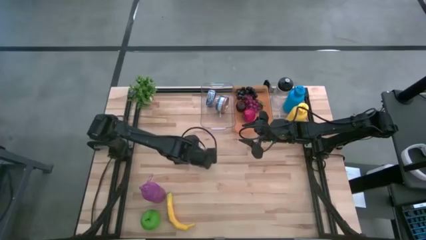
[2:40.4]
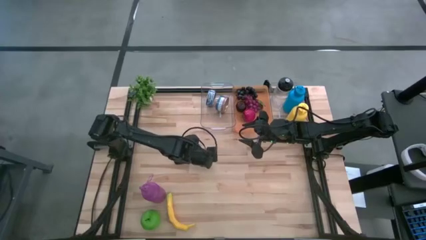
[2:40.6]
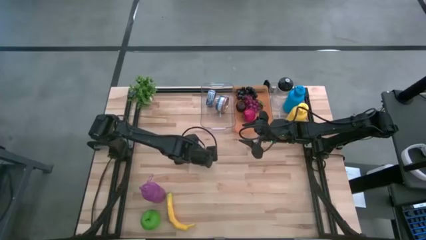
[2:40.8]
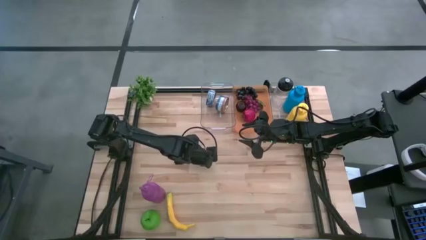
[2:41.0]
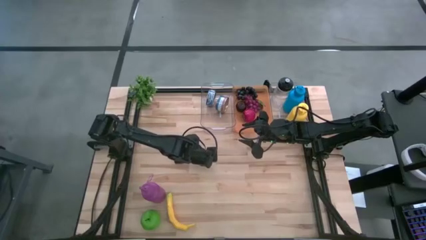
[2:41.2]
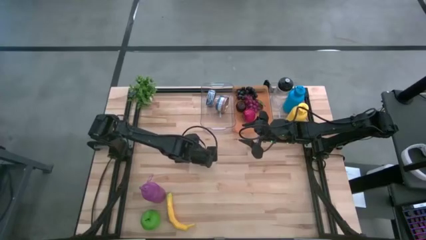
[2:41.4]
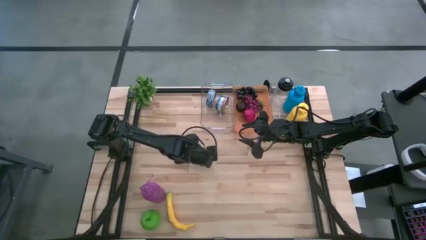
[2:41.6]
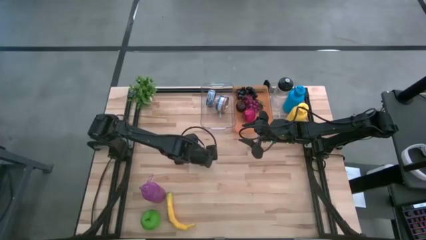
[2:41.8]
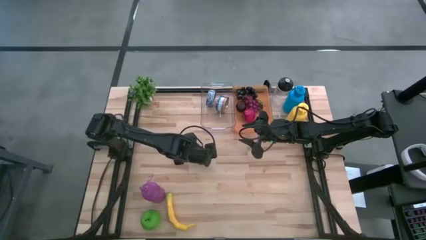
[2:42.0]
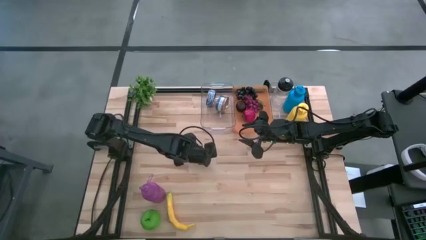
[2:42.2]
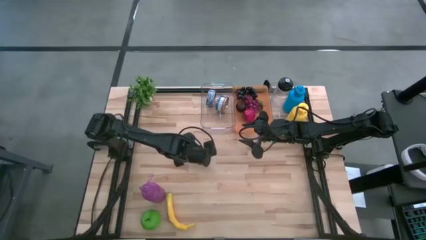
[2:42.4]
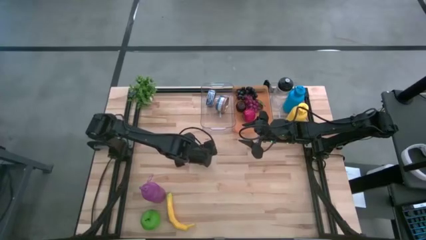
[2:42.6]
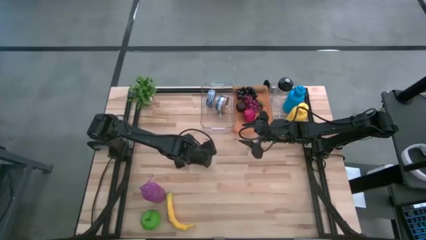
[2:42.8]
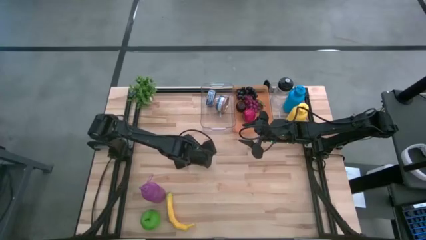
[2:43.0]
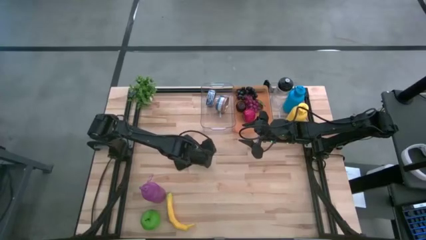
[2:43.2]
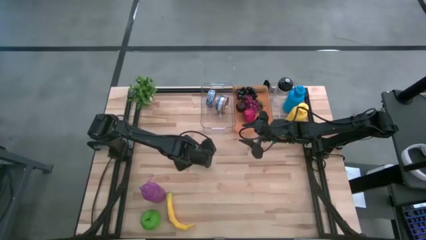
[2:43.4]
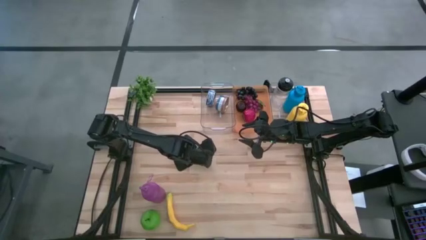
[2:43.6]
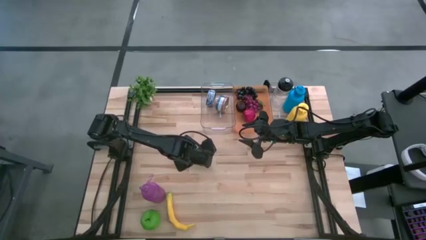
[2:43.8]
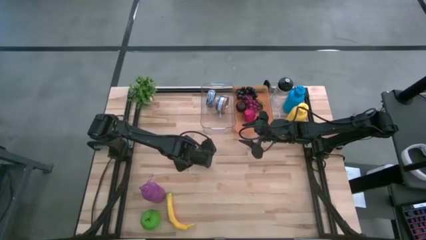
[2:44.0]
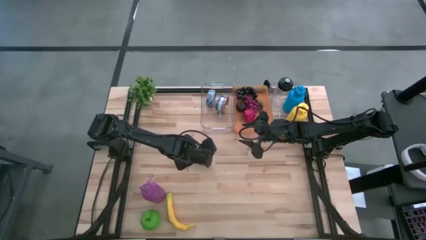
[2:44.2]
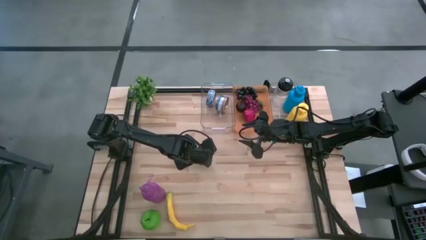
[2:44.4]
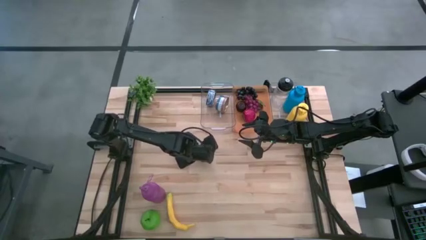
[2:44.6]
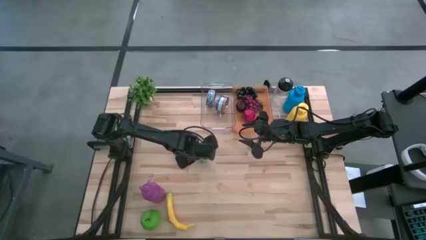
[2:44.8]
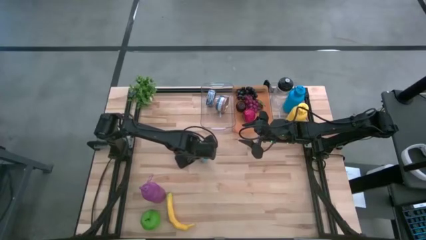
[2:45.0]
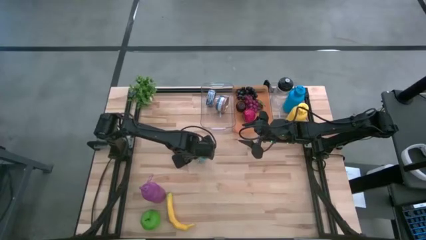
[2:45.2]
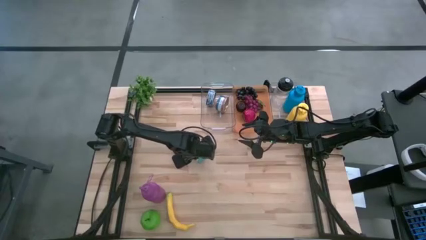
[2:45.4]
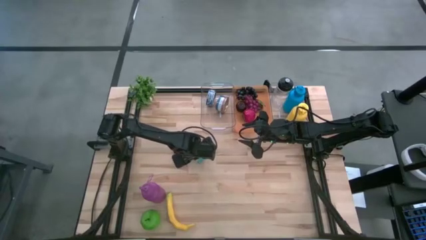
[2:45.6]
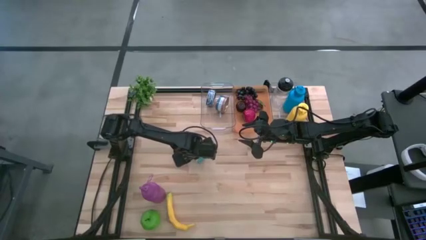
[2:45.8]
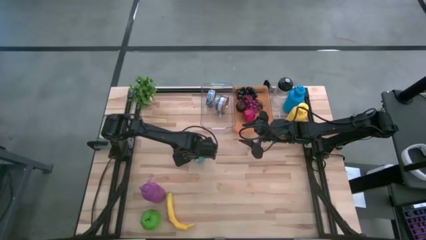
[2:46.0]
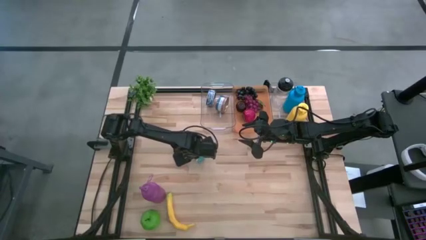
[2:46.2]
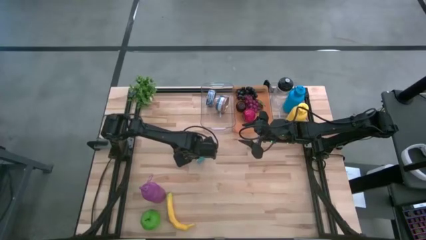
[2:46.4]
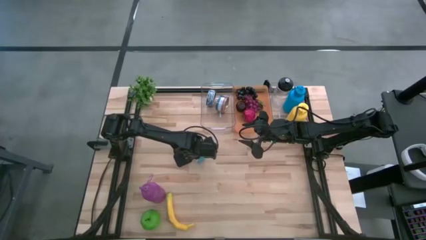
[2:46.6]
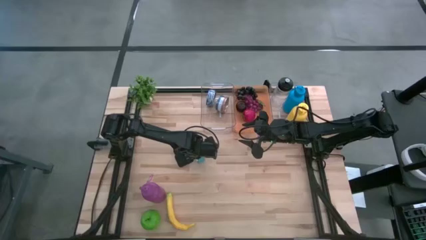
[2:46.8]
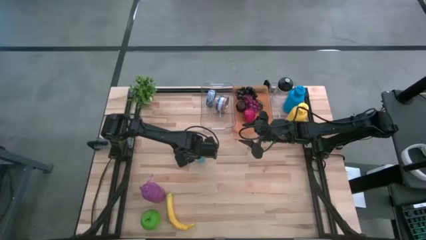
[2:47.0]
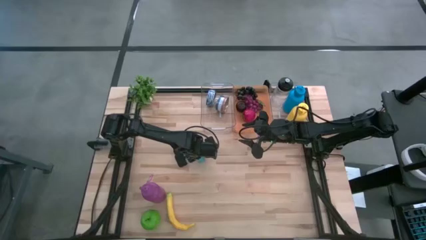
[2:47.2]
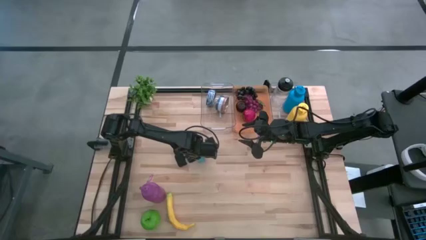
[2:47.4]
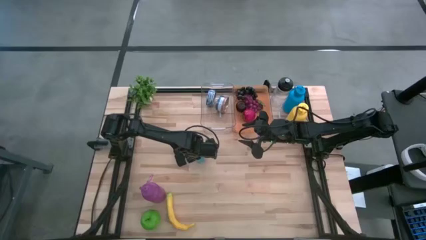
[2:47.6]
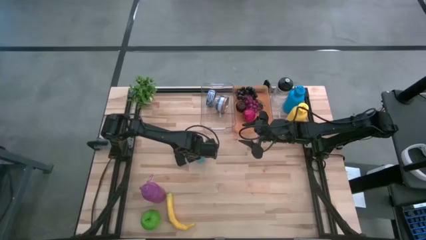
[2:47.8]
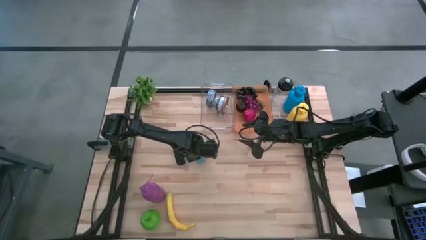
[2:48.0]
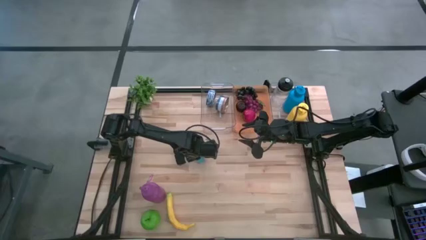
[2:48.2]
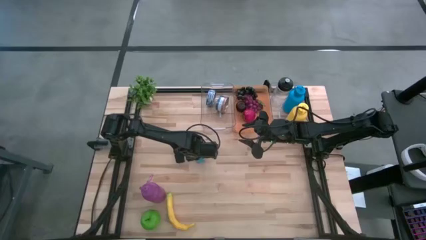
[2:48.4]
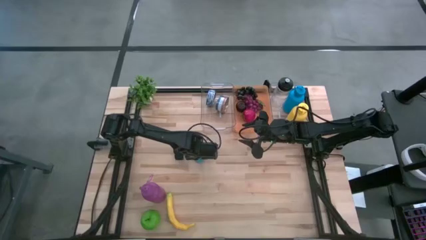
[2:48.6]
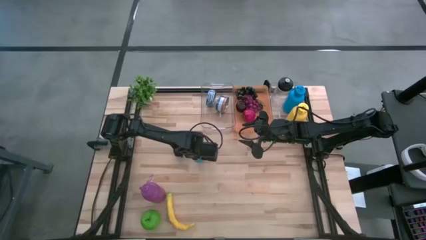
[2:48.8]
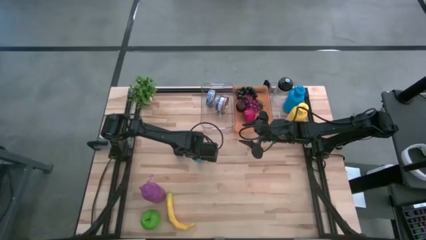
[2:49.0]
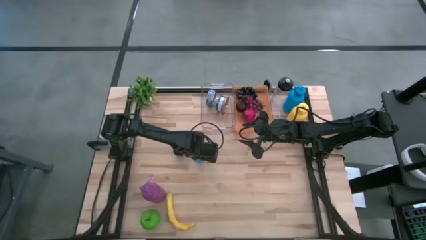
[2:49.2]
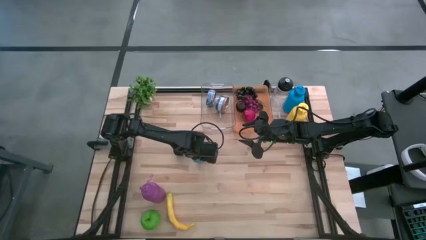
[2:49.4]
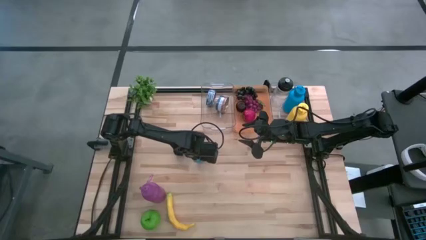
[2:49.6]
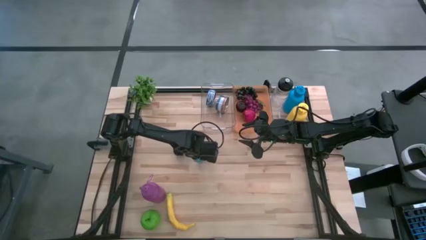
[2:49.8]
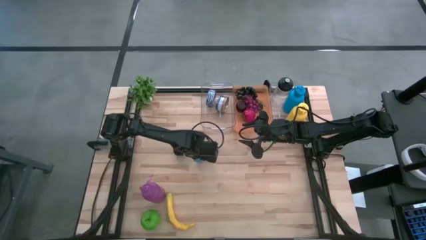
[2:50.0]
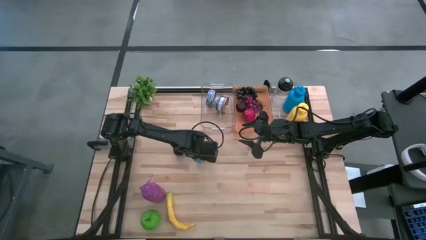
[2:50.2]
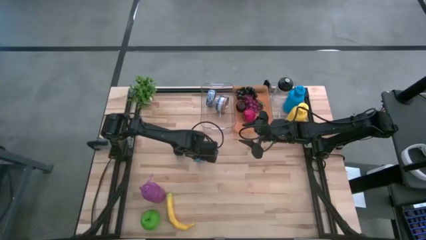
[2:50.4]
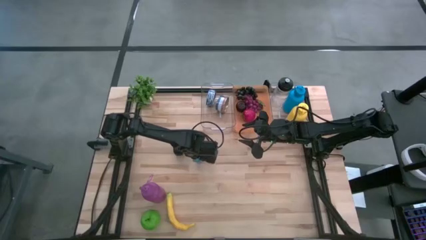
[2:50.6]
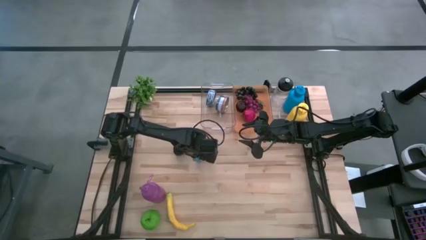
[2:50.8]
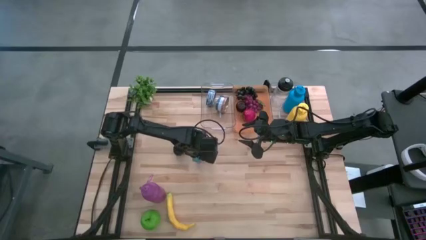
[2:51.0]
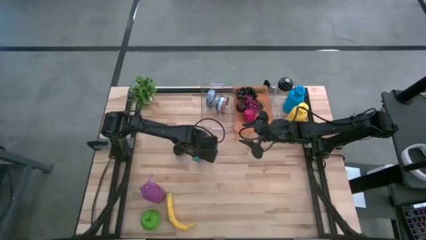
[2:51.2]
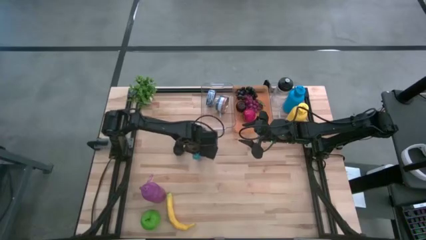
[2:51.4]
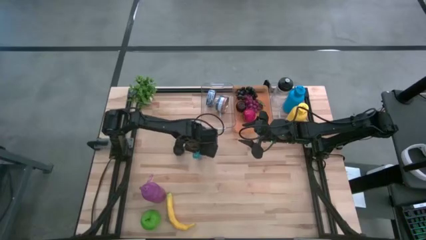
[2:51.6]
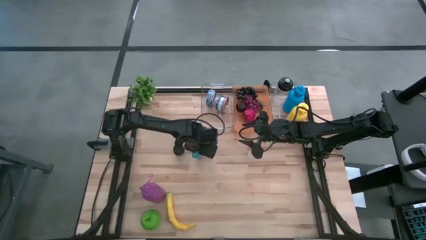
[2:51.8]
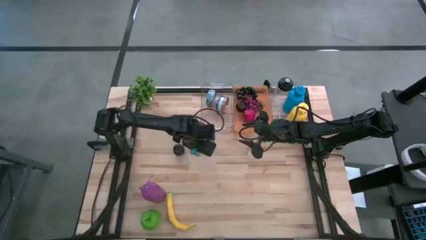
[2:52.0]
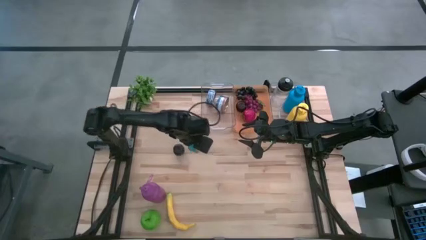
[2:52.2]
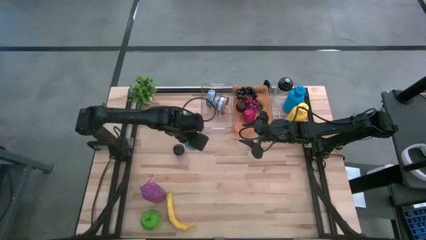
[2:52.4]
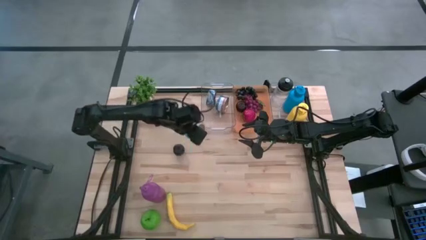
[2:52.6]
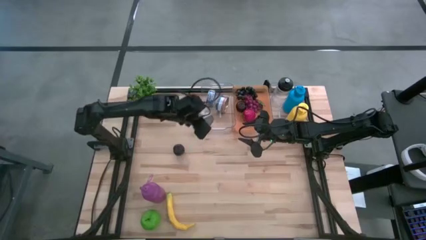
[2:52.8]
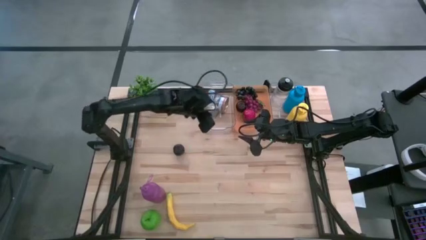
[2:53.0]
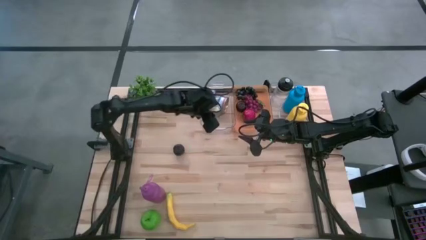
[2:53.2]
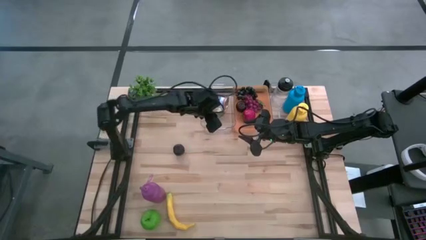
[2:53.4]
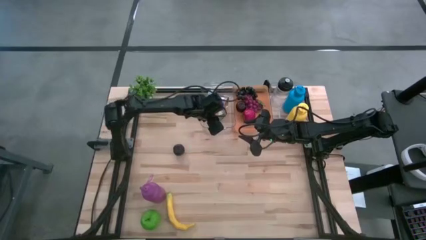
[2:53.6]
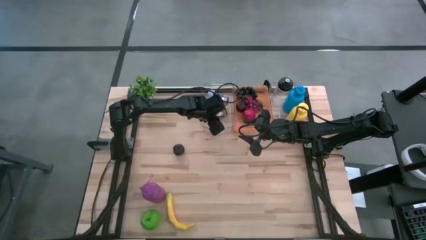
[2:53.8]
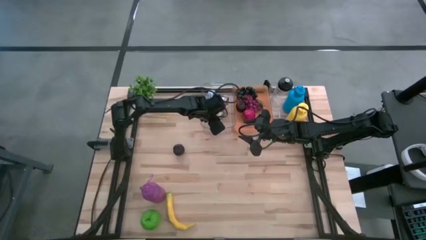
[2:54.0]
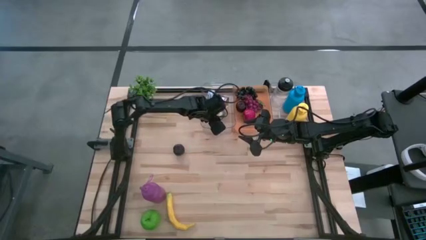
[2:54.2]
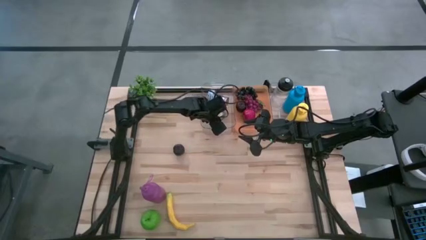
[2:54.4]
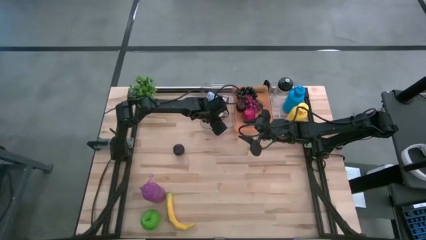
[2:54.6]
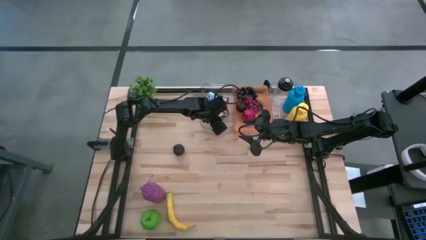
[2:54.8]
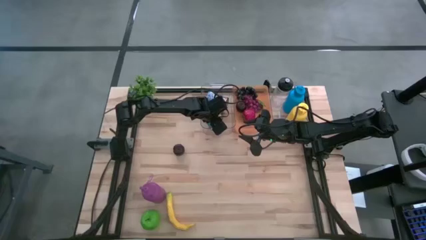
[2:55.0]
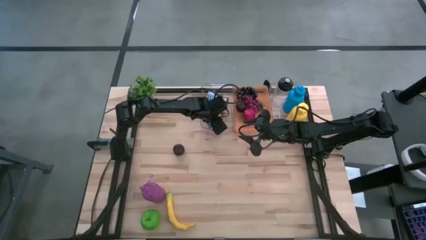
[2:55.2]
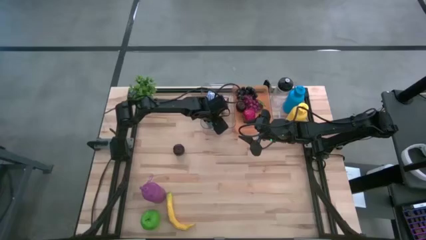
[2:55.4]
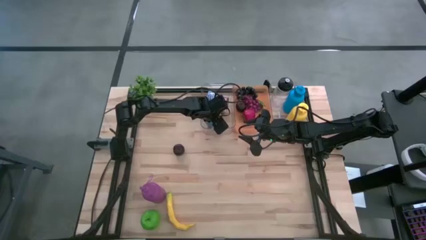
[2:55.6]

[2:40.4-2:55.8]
Task: Pick & Place Food Item
Put the yellow and blue tuna can into the left transparent bin

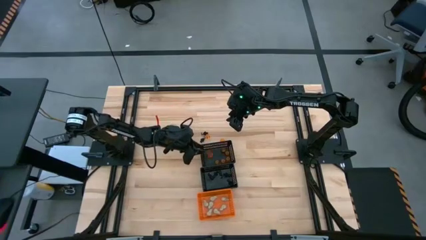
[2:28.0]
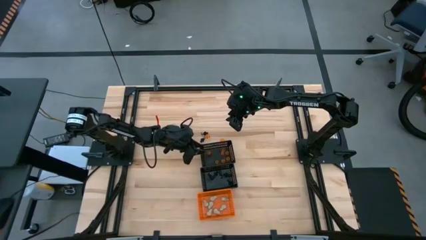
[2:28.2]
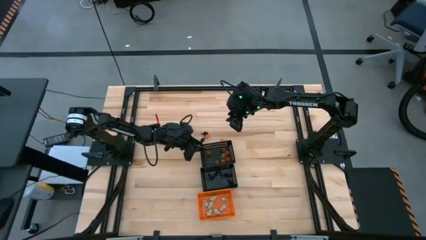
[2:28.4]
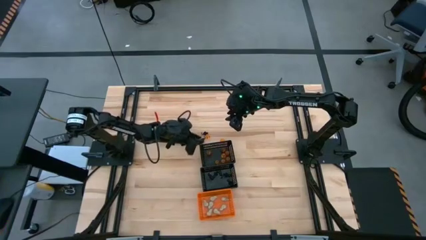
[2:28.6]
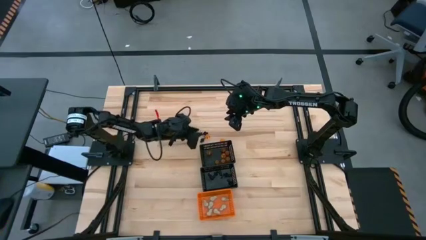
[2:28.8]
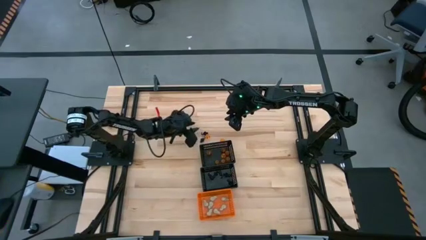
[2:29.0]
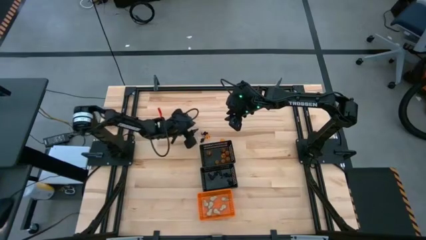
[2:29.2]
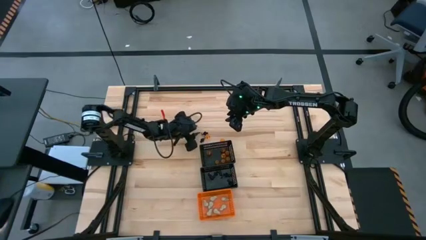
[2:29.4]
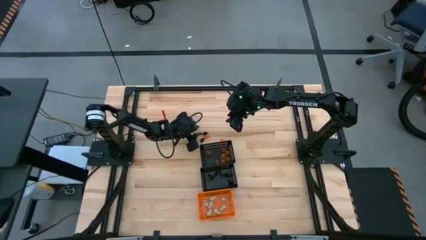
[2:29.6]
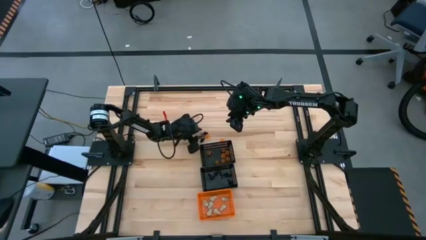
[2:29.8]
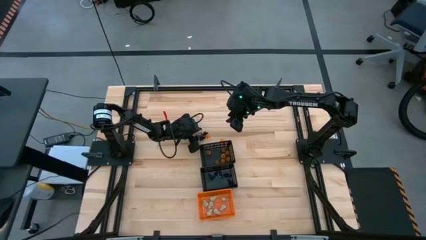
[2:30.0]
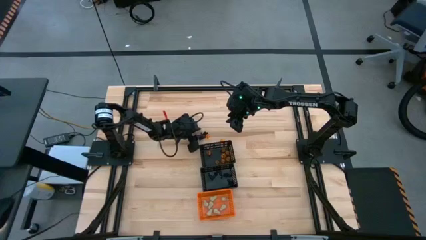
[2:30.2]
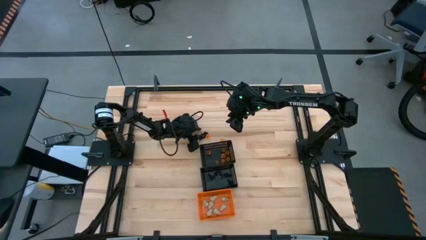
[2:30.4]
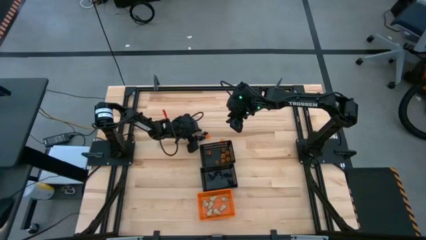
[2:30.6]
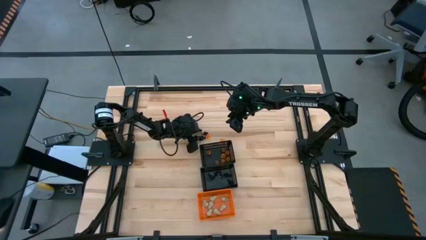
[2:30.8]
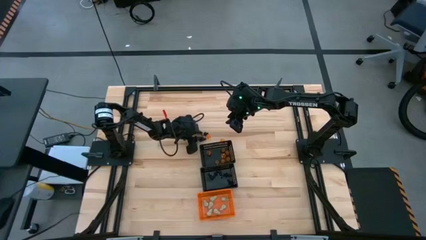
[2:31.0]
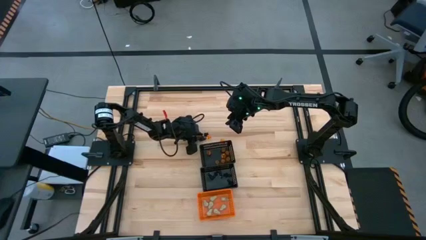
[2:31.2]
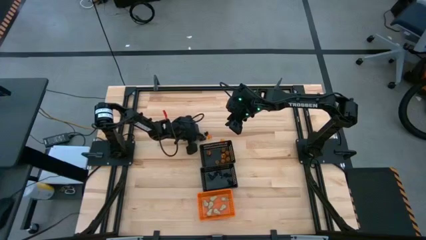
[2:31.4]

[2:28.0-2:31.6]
Task: Sort Halloween decoration
Put the black skeleton toy into the bottom black bin
